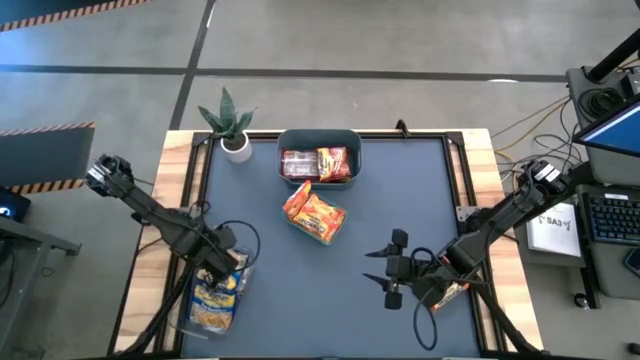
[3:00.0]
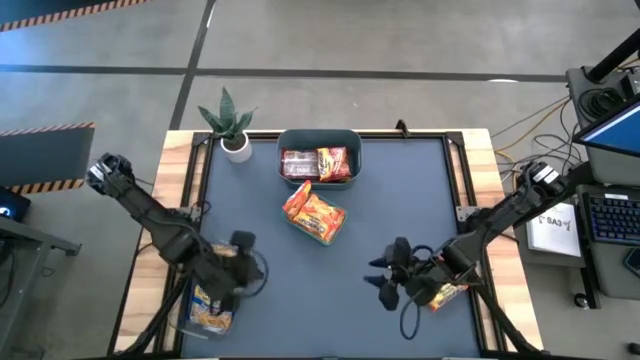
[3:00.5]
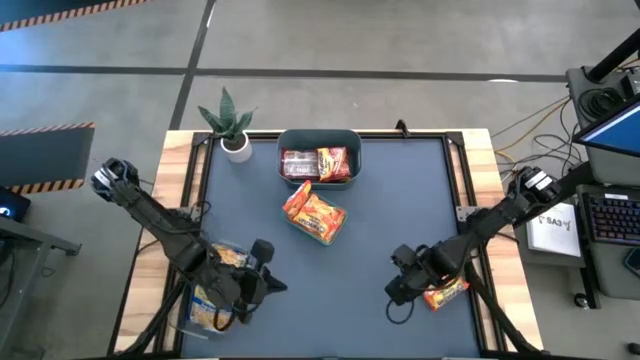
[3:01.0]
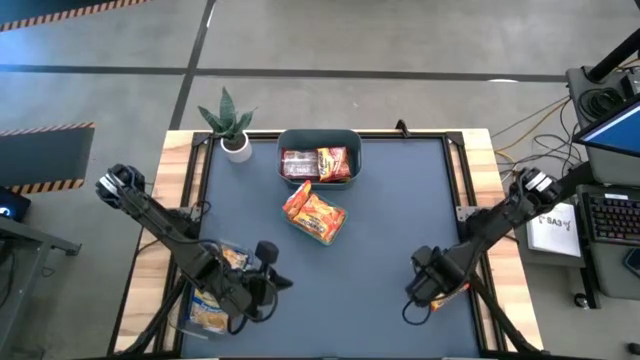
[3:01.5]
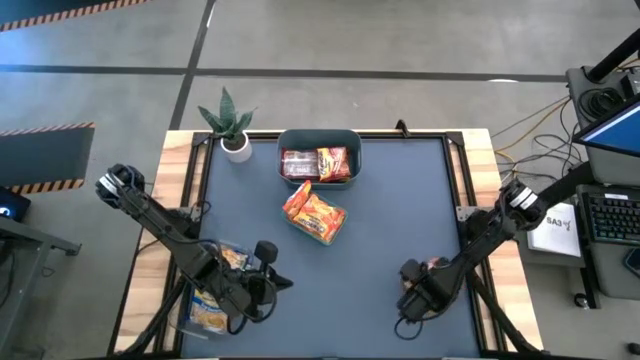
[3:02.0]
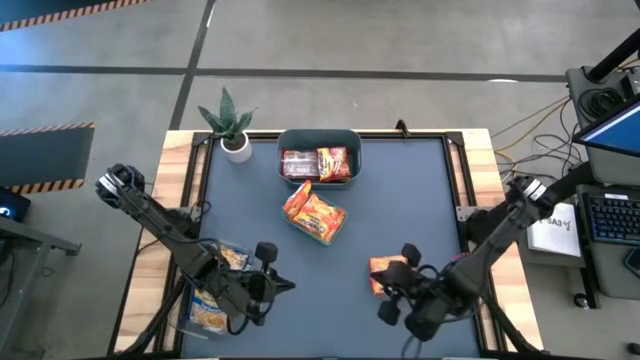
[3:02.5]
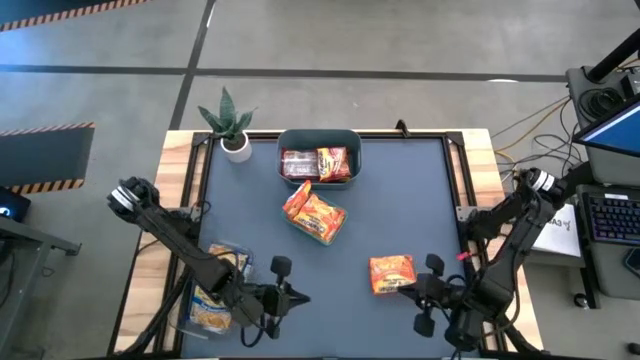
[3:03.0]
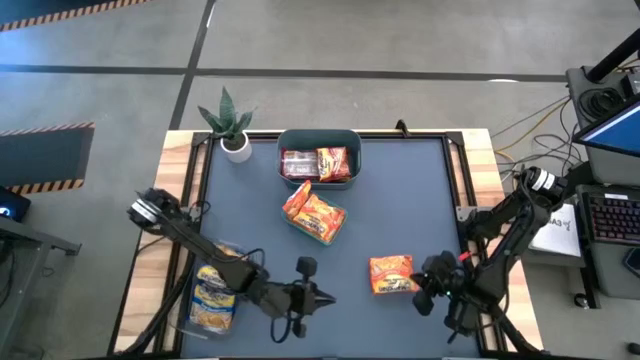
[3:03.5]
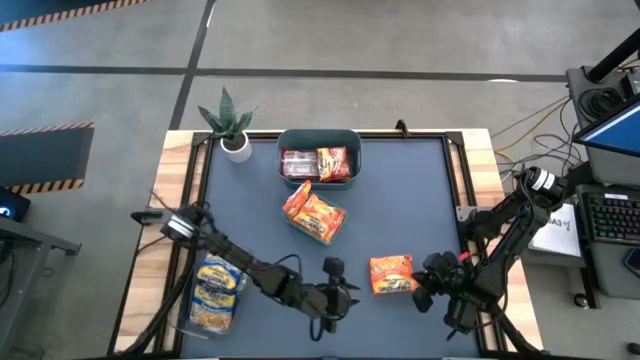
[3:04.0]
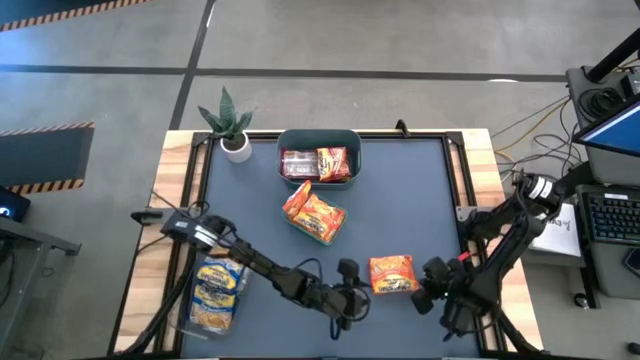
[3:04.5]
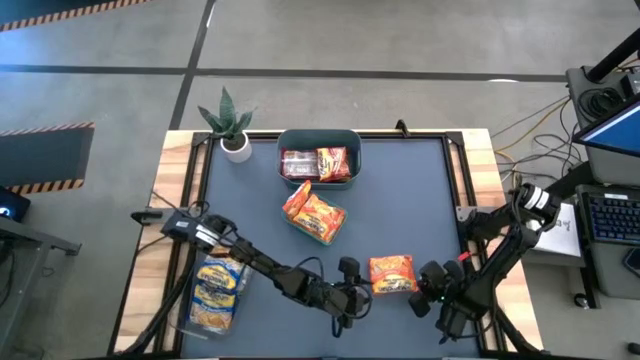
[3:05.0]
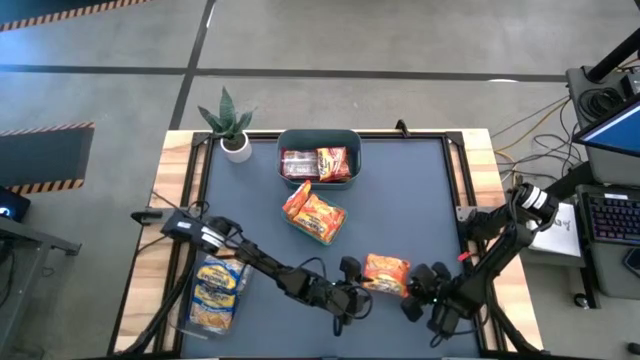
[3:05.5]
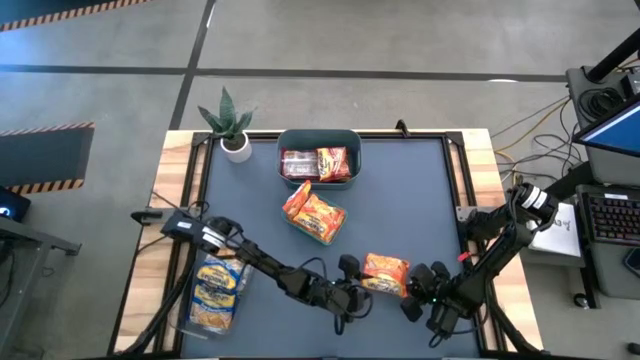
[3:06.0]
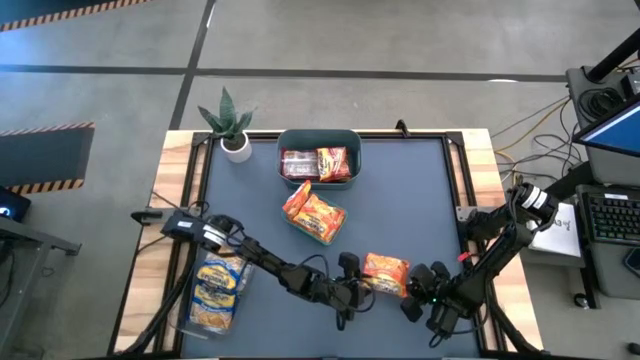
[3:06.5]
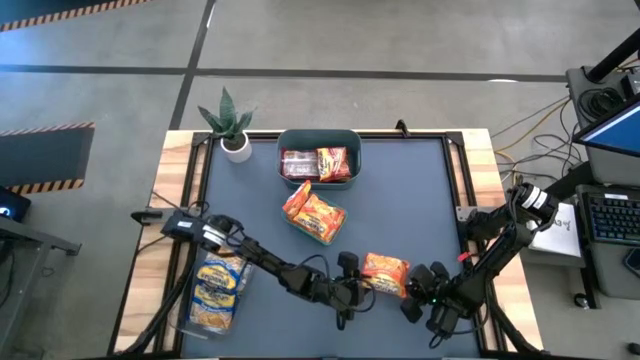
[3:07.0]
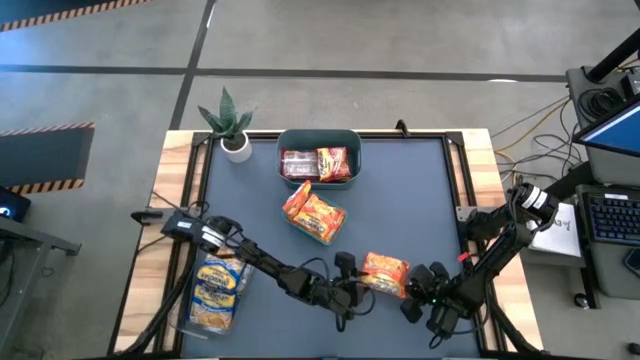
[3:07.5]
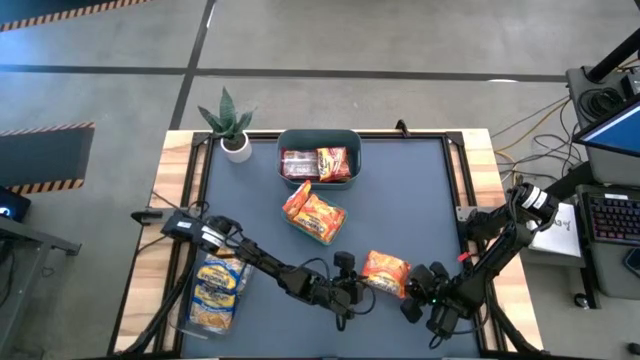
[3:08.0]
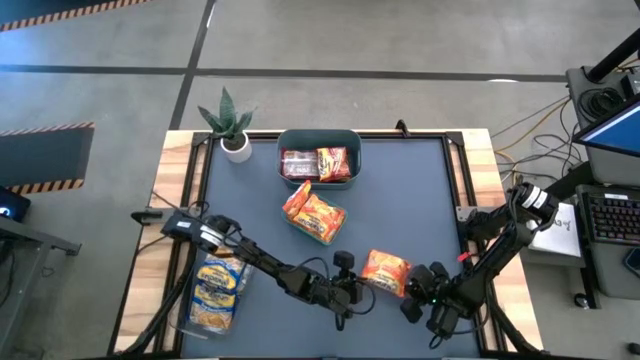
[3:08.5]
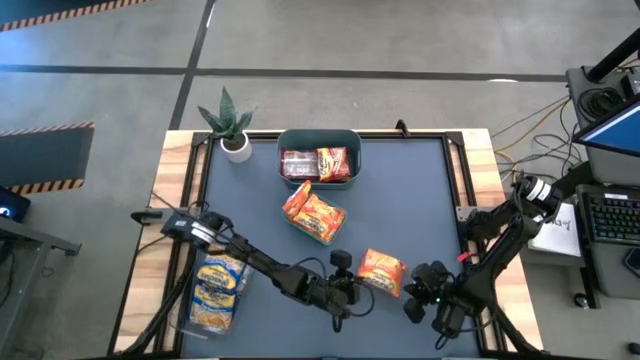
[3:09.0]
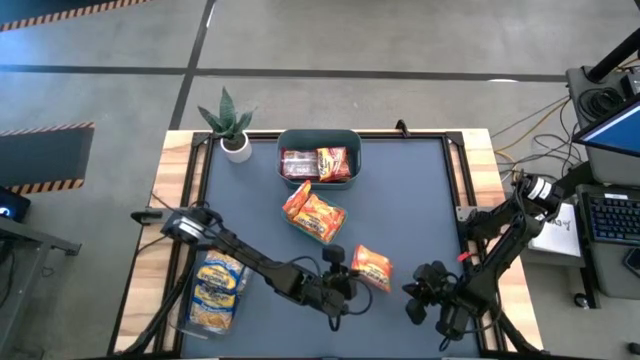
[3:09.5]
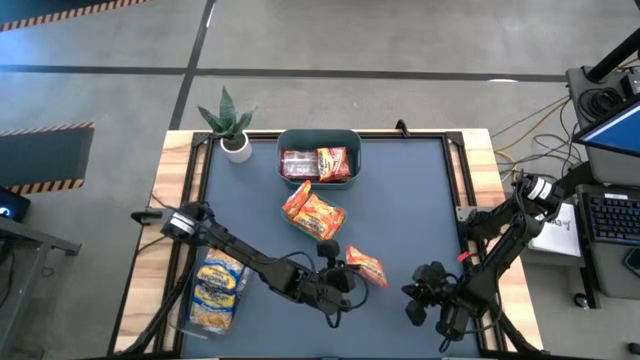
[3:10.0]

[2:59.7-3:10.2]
Task: Sort Maruchan noodles
Put the orange noodle pack into the green bin

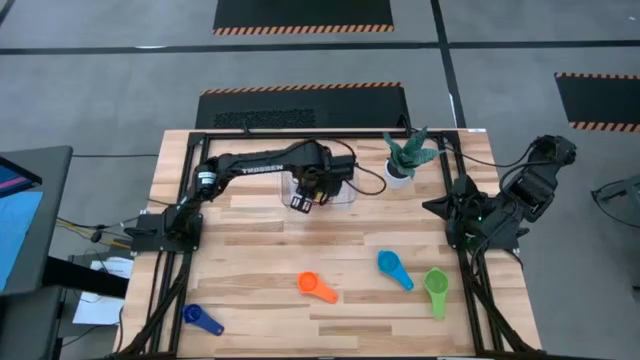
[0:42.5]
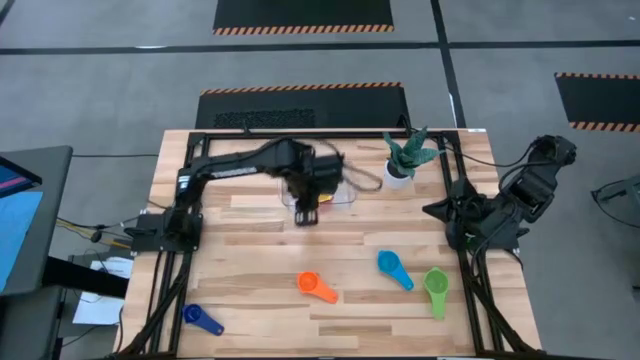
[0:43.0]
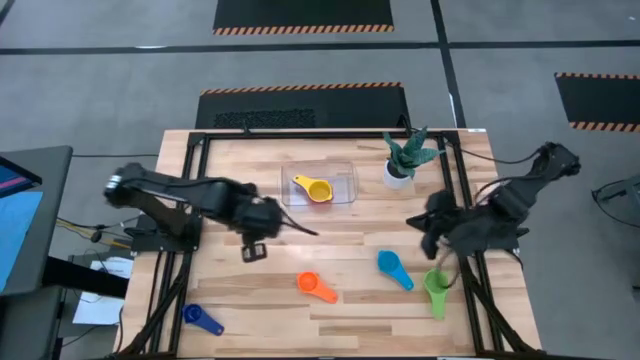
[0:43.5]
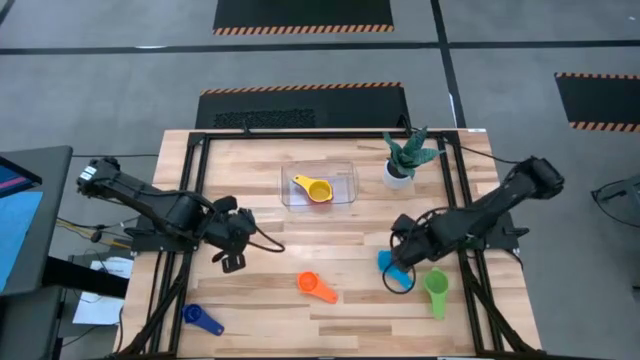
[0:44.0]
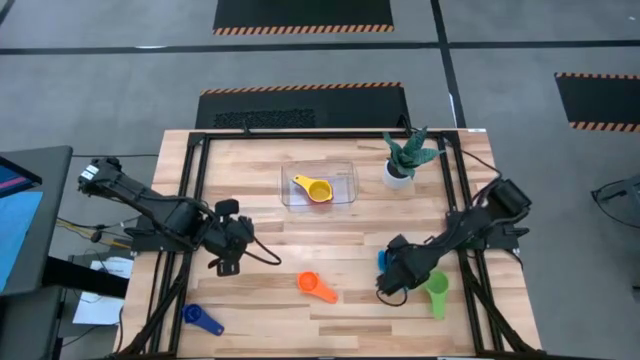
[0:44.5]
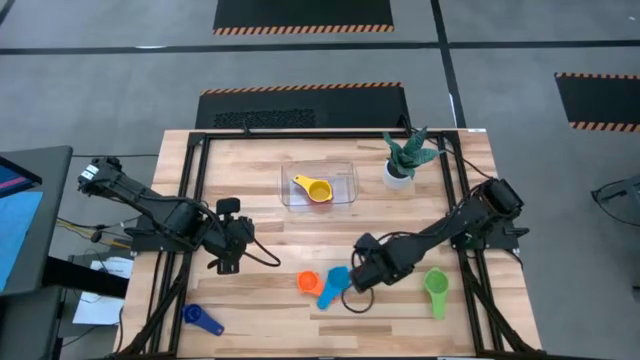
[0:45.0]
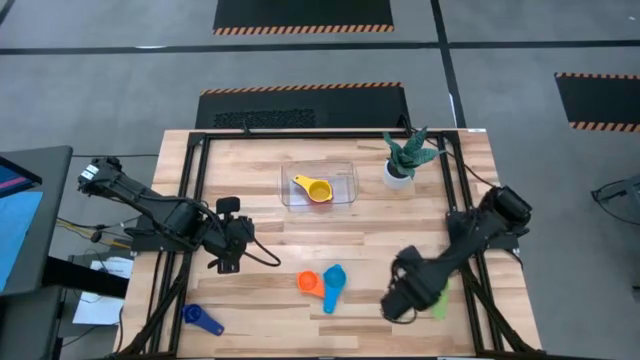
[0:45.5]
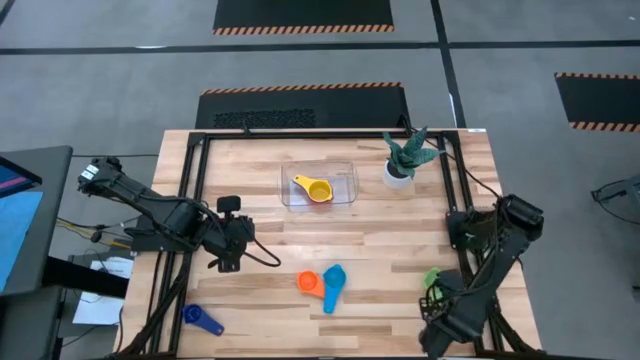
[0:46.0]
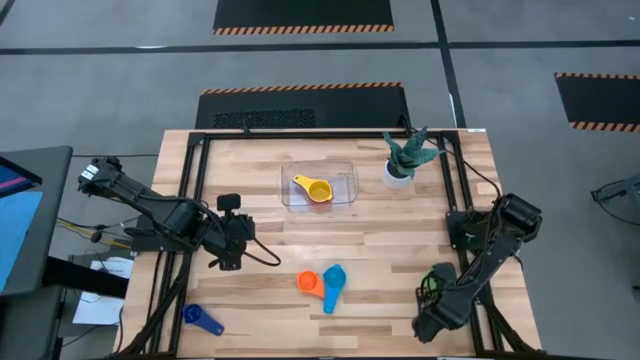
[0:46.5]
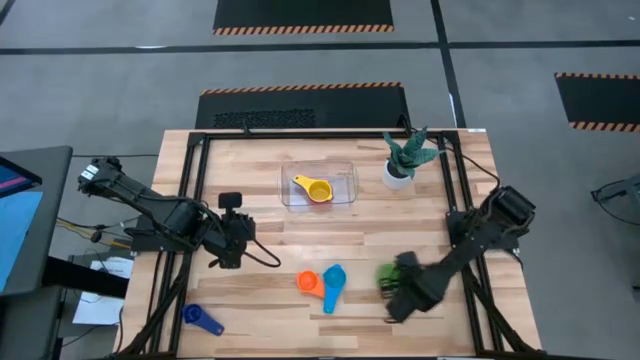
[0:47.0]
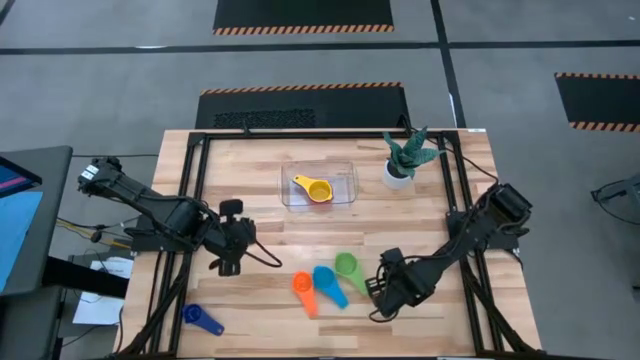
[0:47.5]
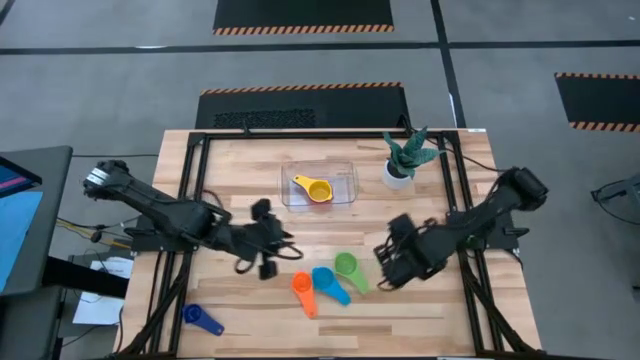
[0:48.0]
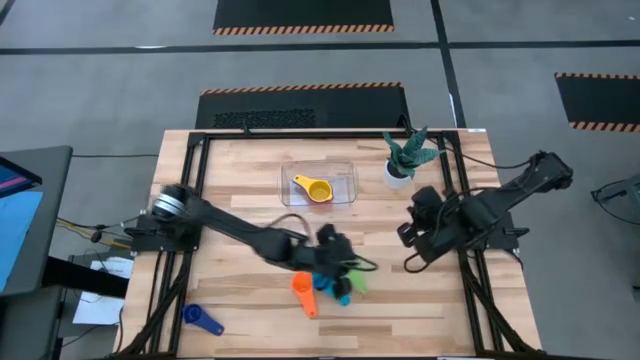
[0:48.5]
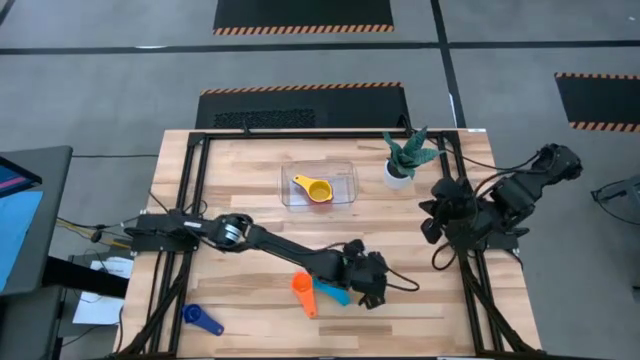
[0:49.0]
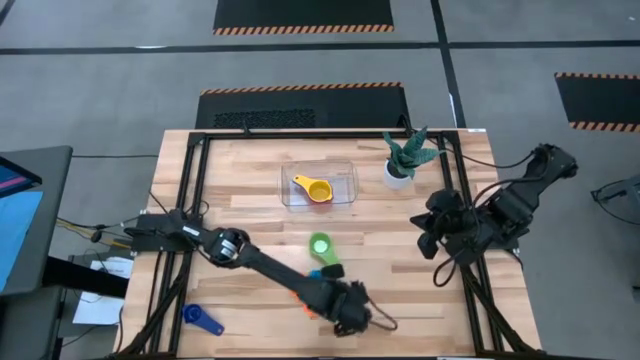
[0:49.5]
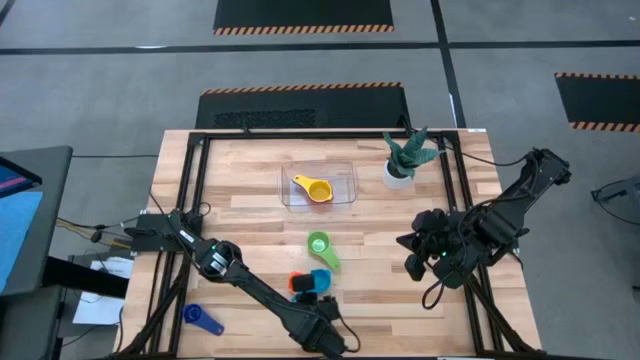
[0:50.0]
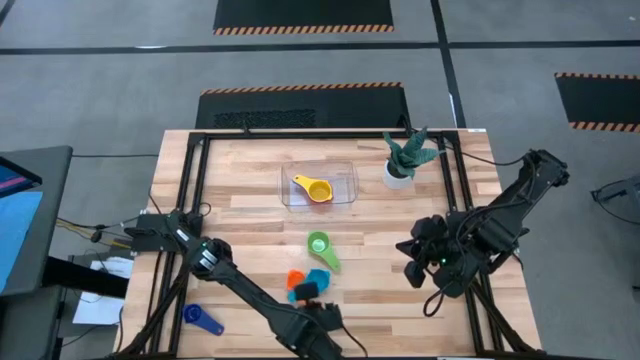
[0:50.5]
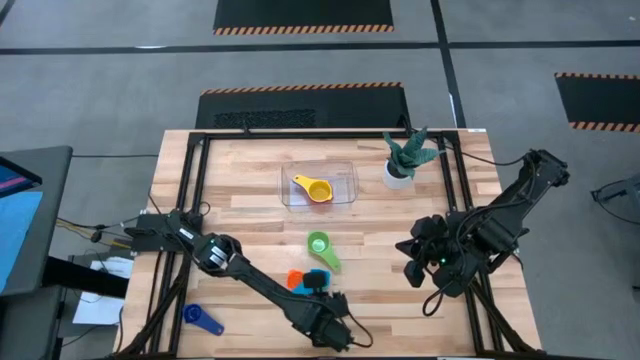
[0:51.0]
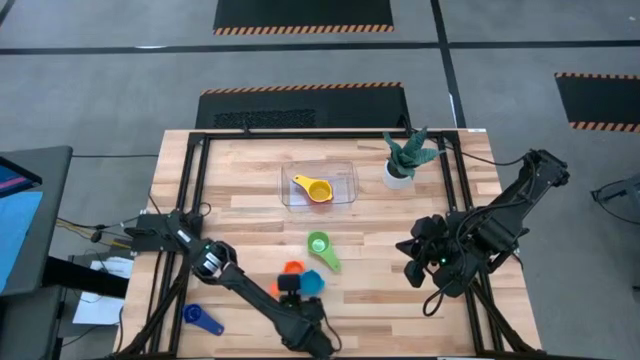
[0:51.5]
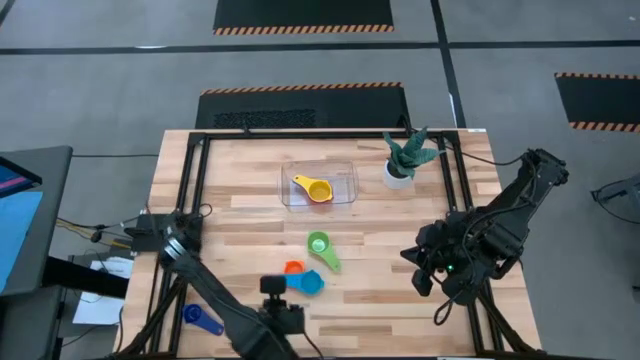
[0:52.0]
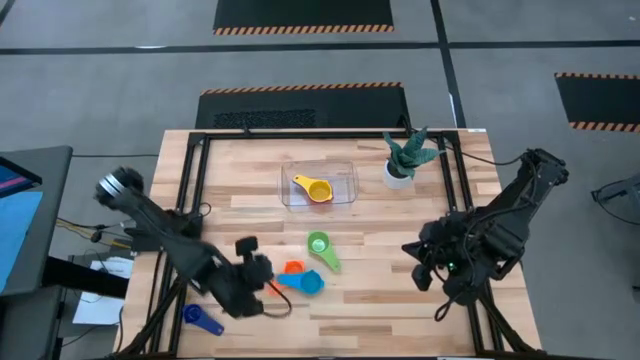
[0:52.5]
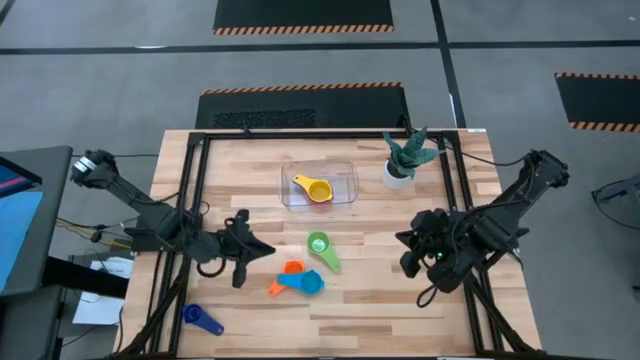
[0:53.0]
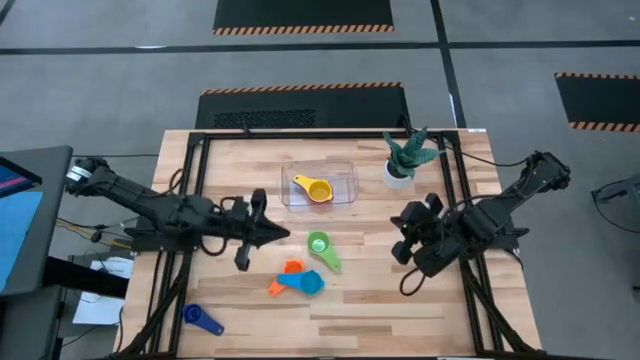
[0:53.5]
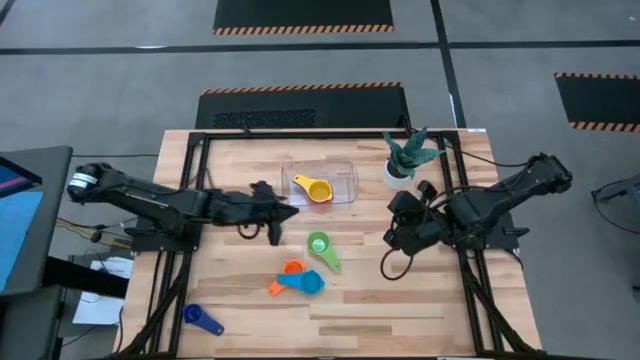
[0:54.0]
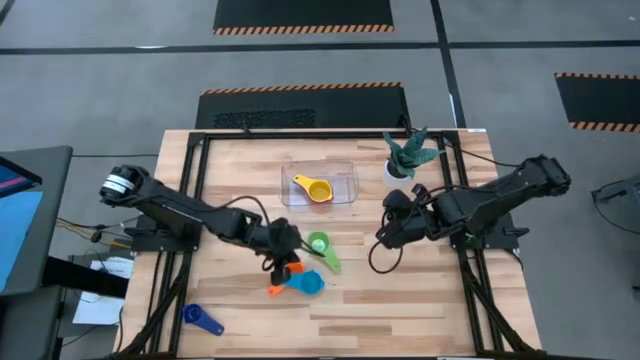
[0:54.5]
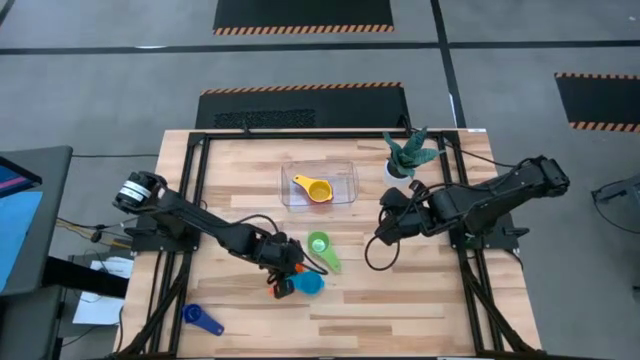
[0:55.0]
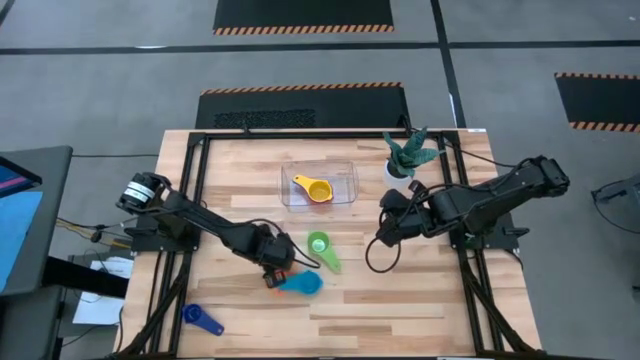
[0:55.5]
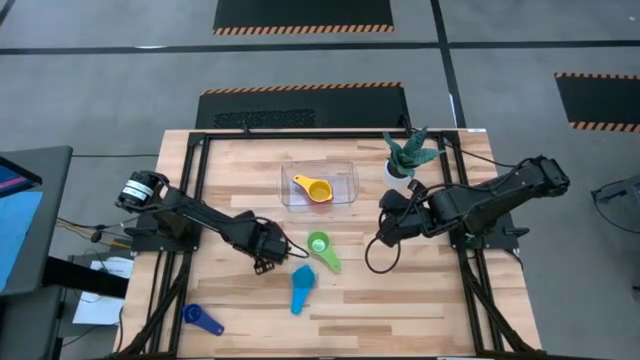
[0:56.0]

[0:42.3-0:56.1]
Task: Nest measuring cups in basket
Move the measuring cups to the center of the table
